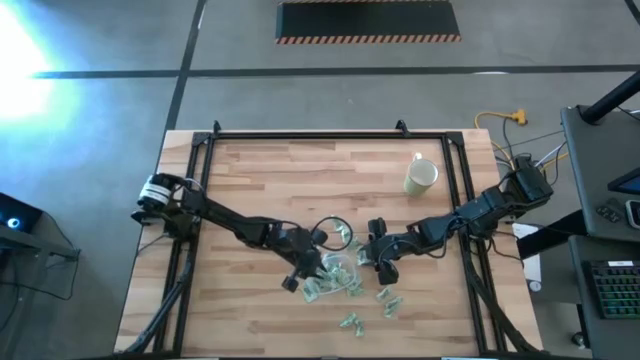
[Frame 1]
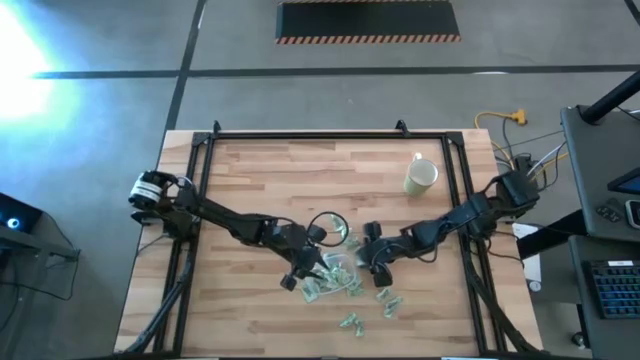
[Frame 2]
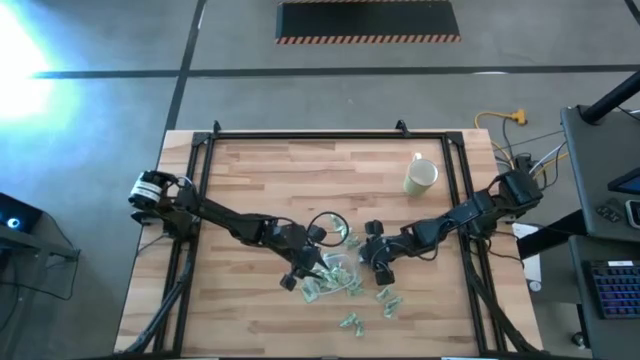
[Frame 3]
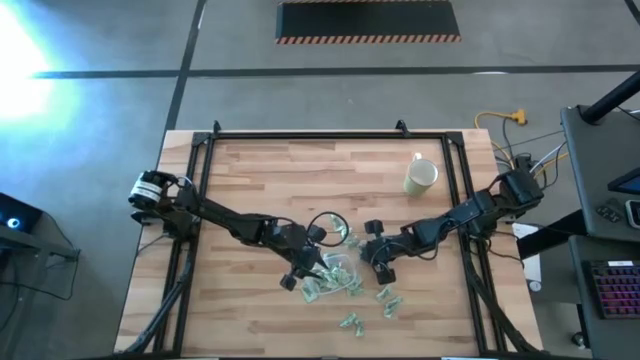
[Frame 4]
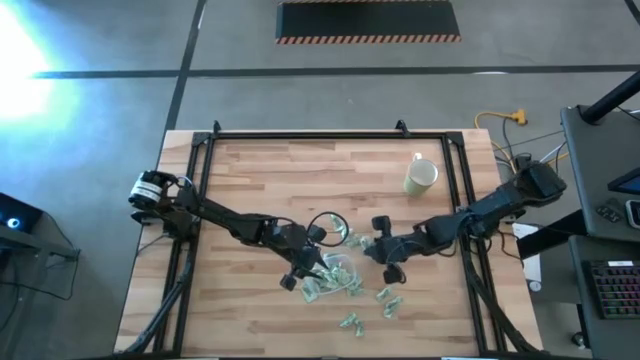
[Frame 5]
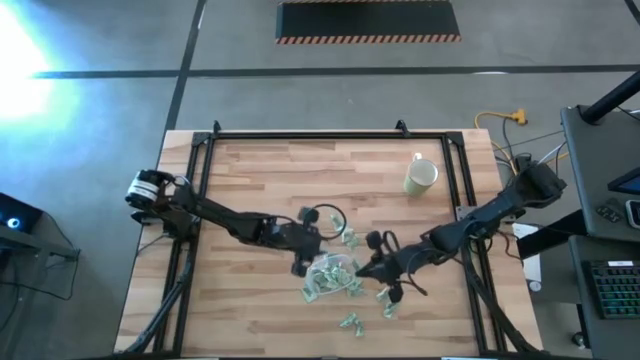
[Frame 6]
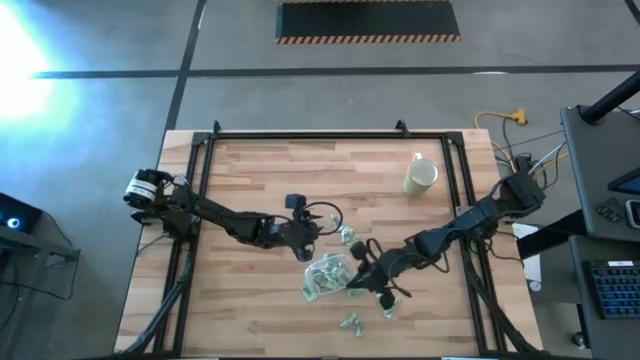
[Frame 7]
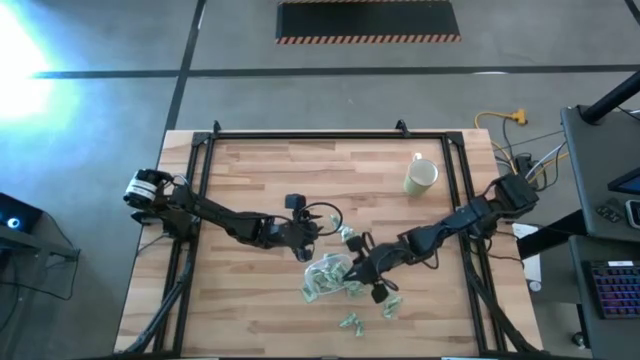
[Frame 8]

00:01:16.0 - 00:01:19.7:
Task: Pick and place items into bin
Put the Stevia packet into the transparent bin

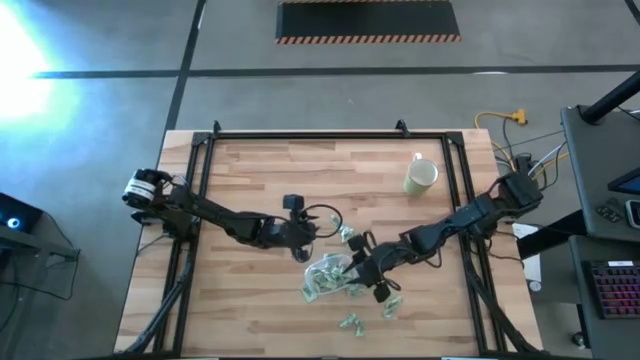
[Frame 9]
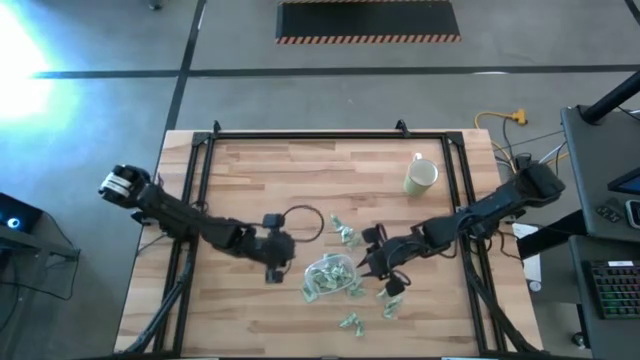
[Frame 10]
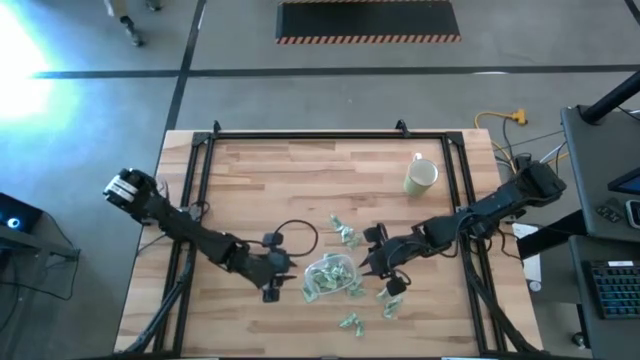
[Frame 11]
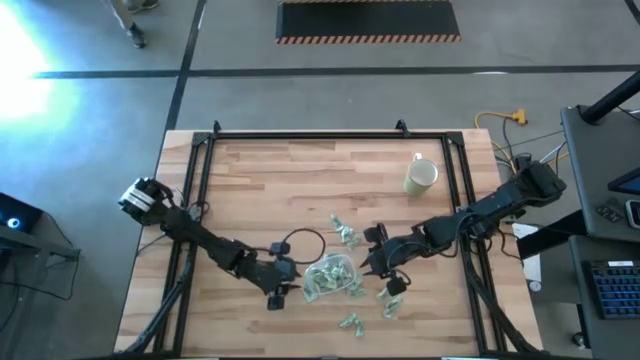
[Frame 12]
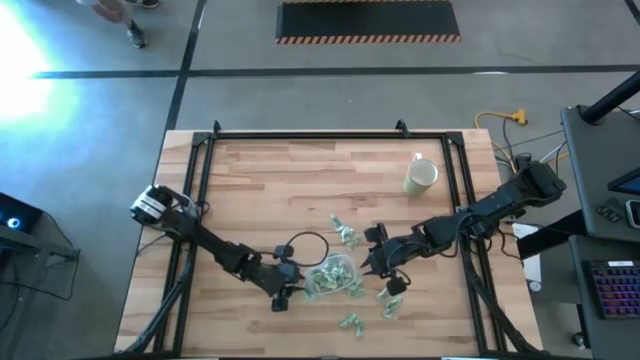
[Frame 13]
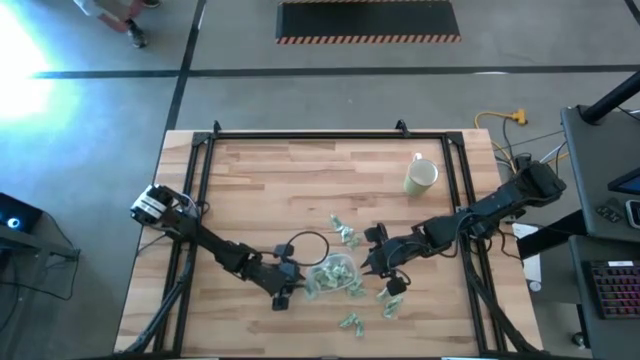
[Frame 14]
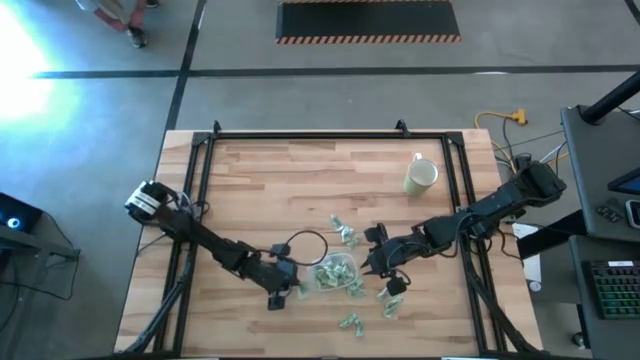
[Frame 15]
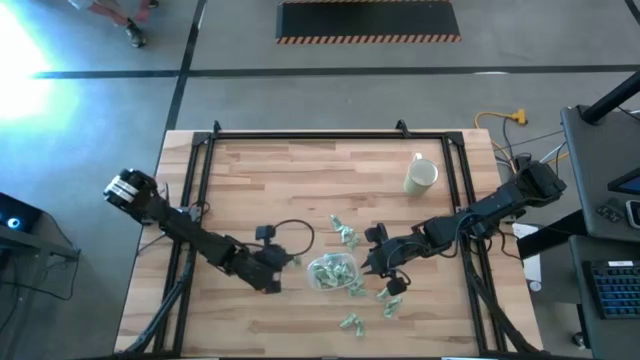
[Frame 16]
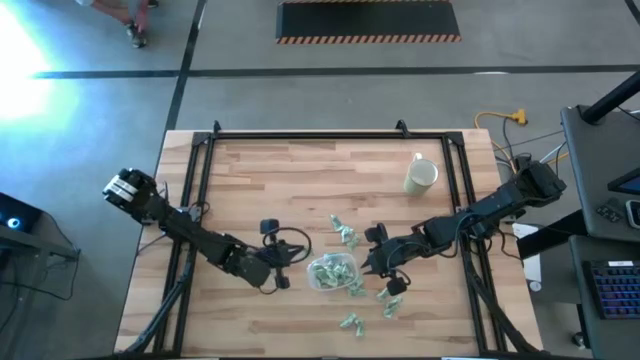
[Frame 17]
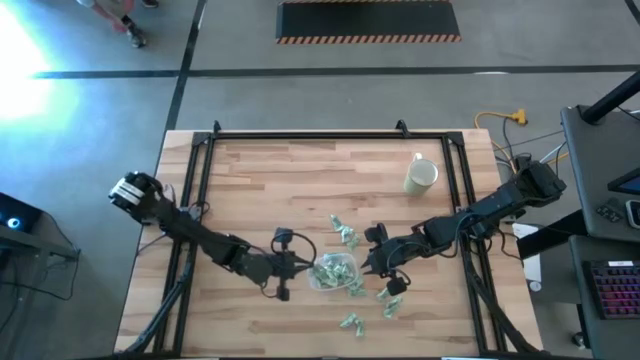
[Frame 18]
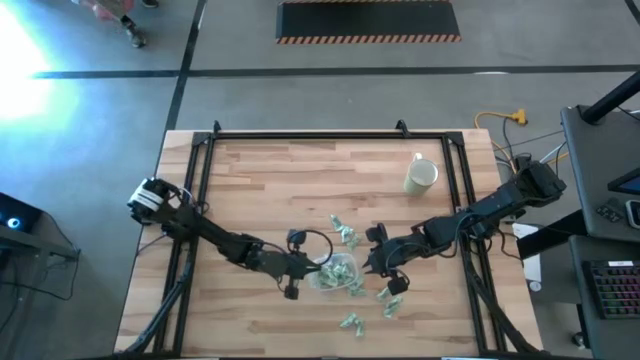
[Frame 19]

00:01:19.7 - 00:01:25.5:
Put the Stevia packet into the transparent bin

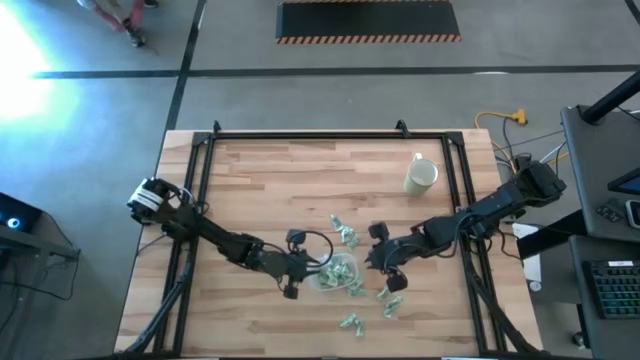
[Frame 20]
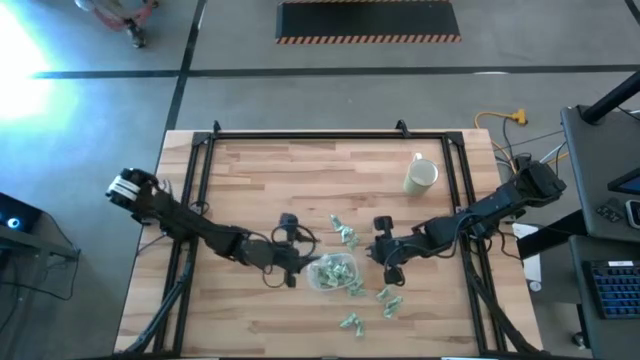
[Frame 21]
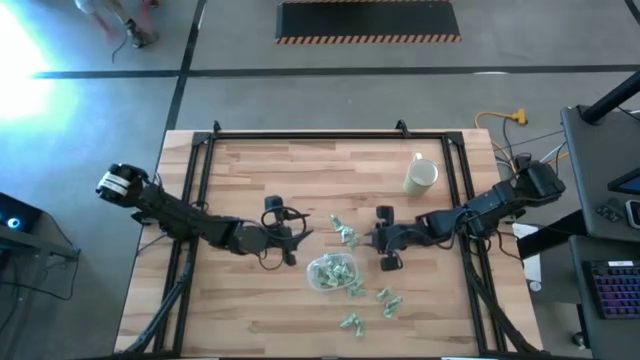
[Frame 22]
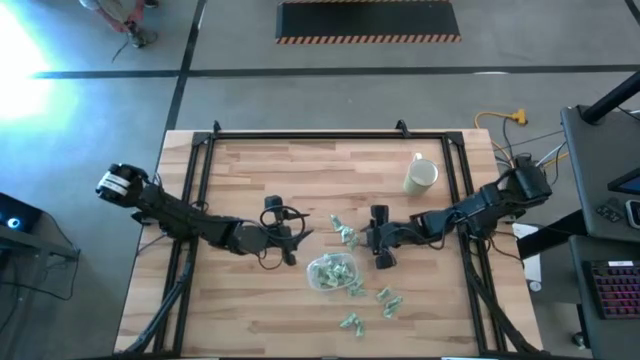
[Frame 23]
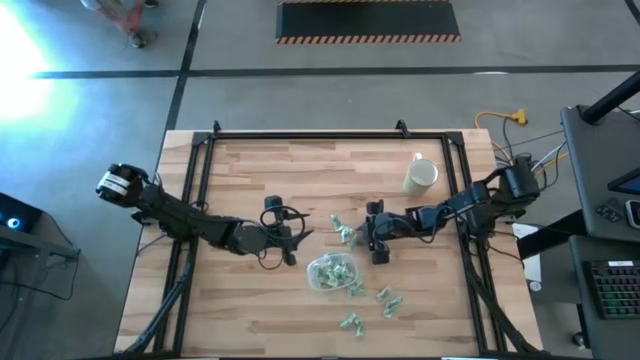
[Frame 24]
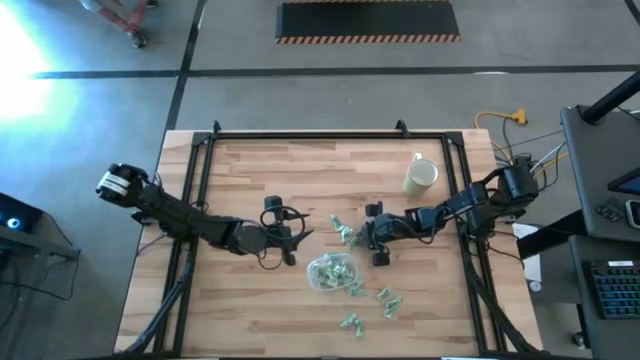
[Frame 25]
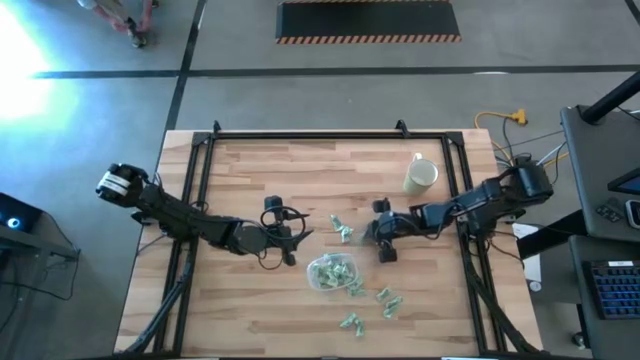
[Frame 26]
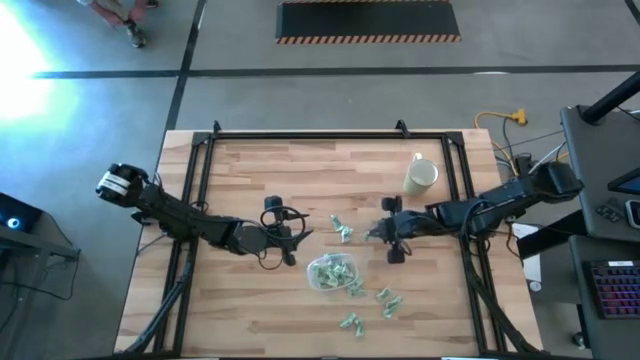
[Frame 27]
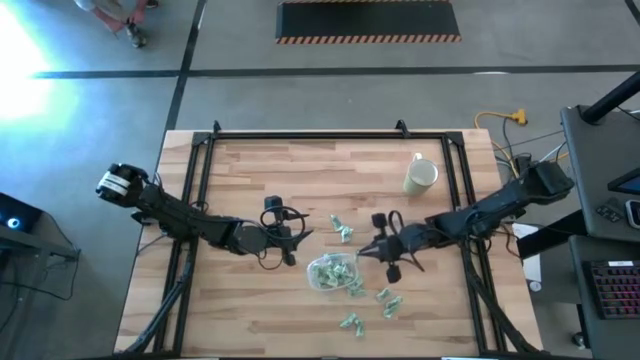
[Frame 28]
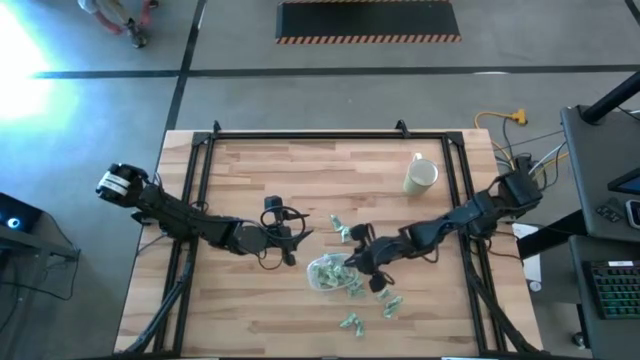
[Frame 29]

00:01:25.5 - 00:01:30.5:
Put the Stevia packet into the transparent bin

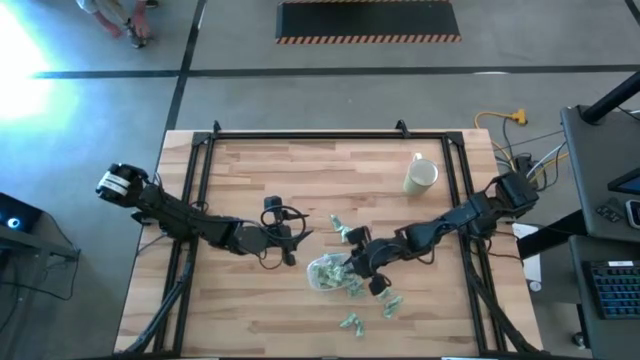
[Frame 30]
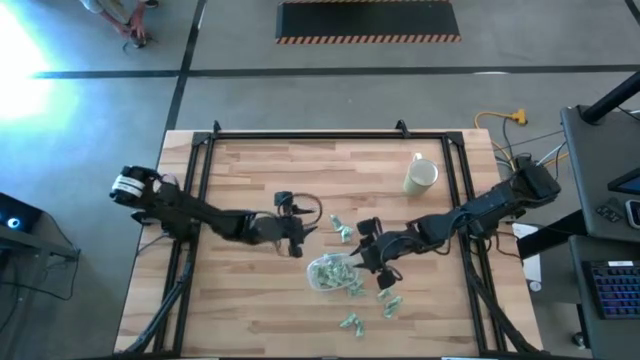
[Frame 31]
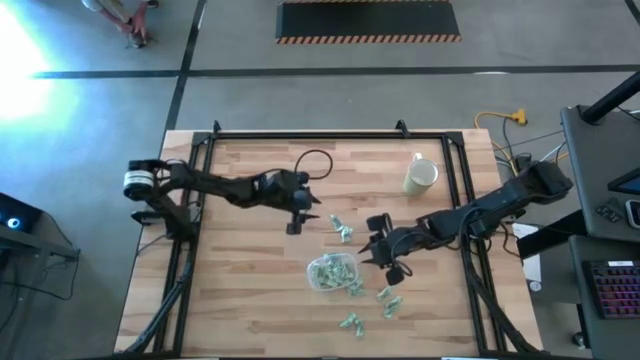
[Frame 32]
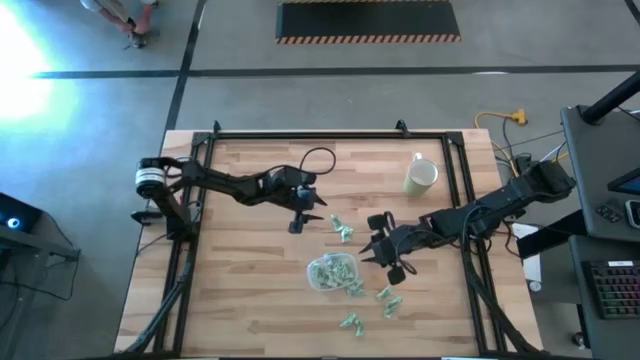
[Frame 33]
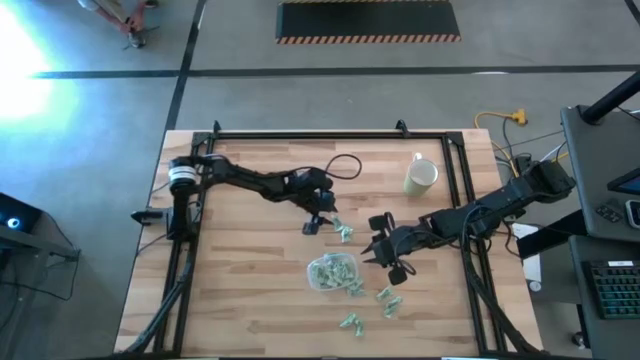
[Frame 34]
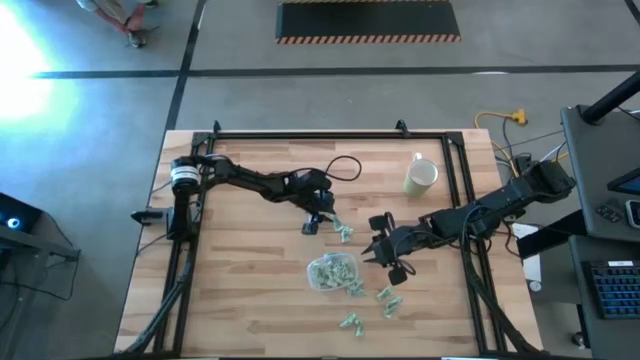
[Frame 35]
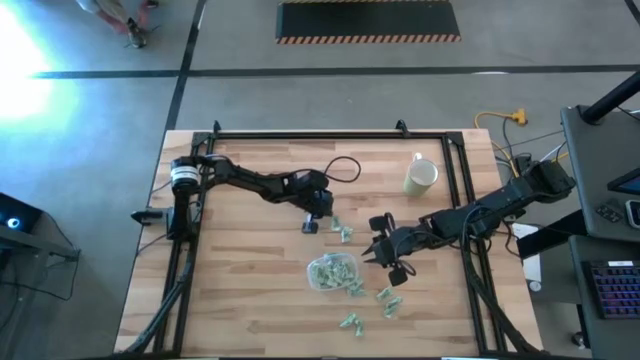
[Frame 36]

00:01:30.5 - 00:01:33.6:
Put the Stevia packet into the transparent bin

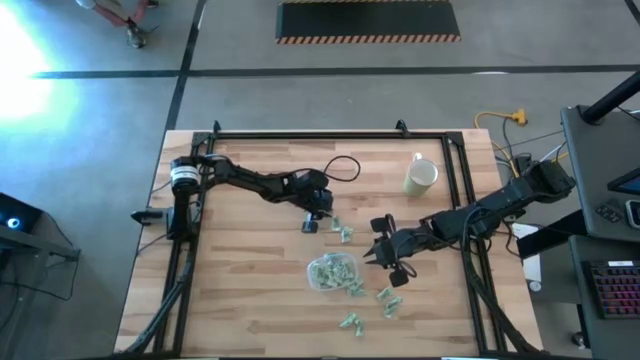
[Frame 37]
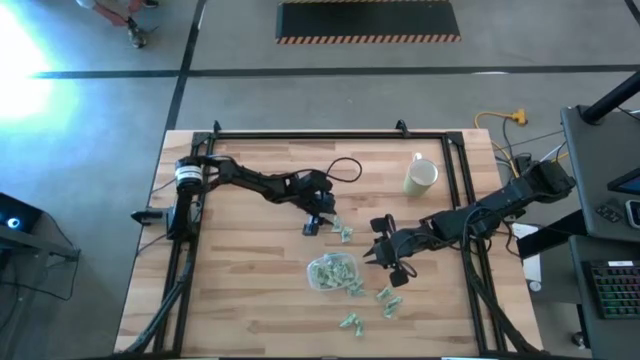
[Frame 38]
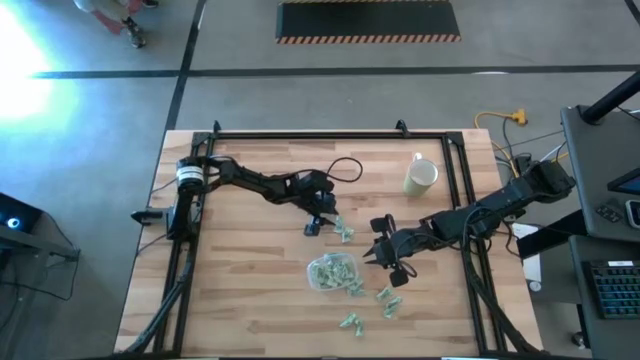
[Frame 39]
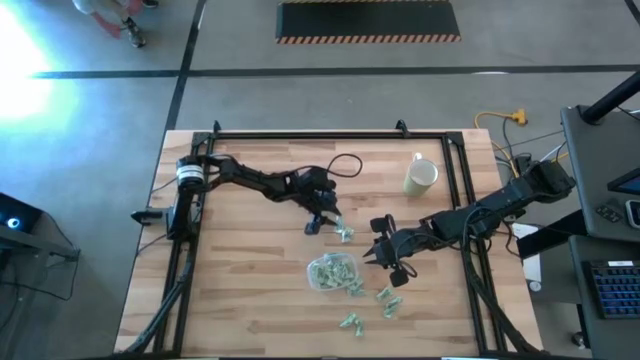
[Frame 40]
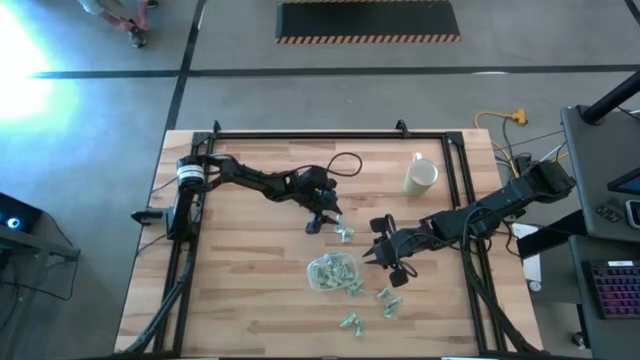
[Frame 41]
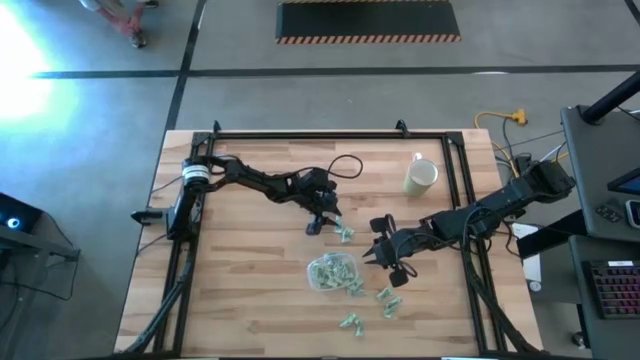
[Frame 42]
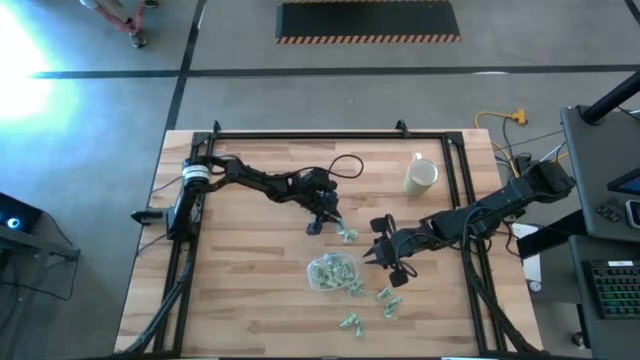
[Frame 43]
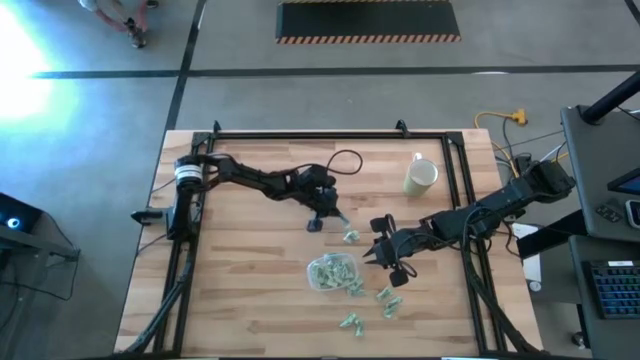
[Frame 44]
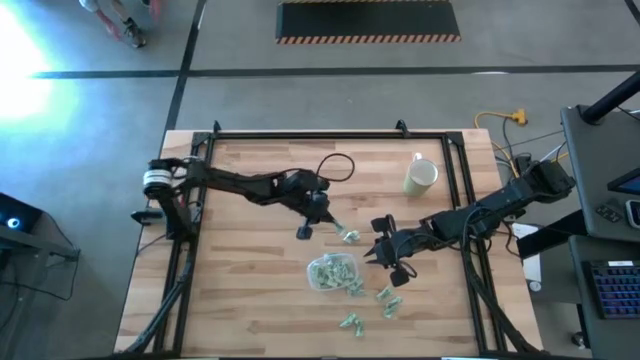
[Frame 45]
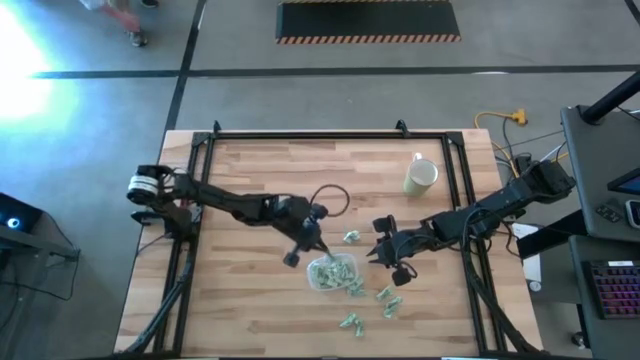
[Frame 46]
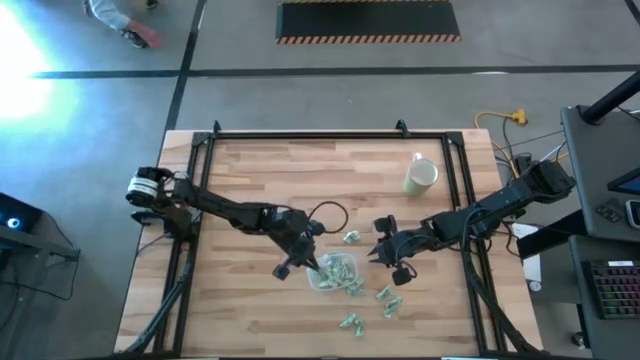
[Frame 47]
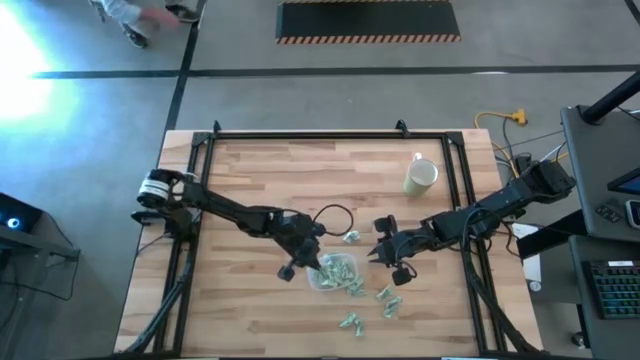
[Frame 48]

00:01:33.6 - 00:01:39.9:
Put the Stevia packet into the transparent bin
